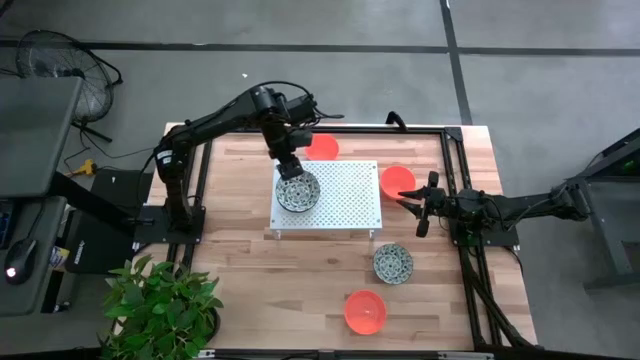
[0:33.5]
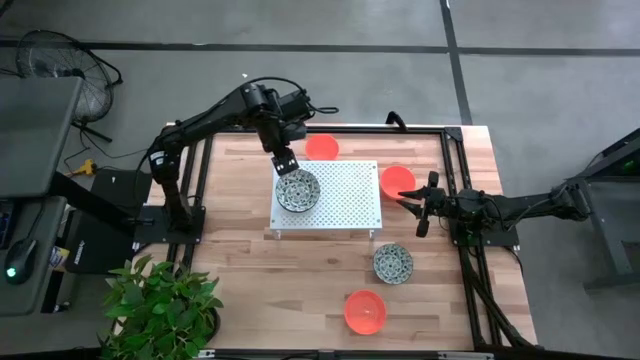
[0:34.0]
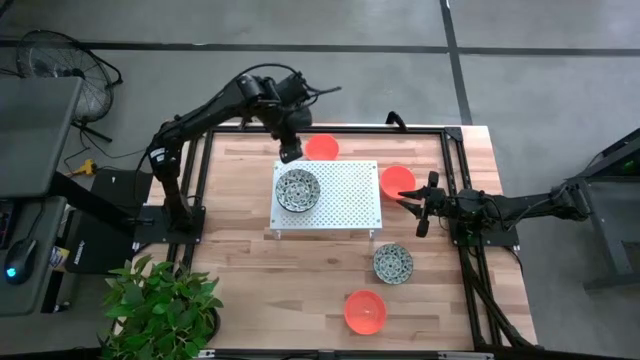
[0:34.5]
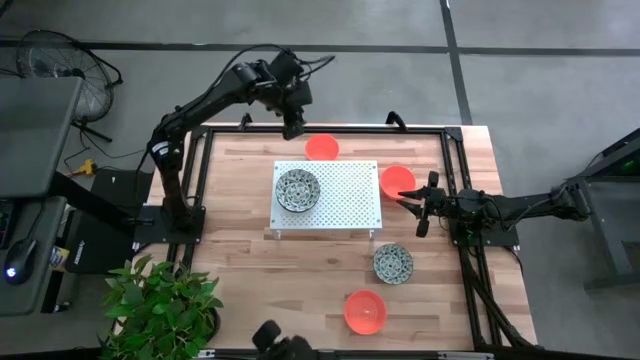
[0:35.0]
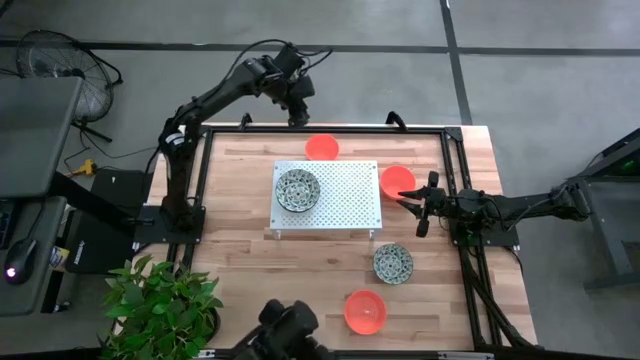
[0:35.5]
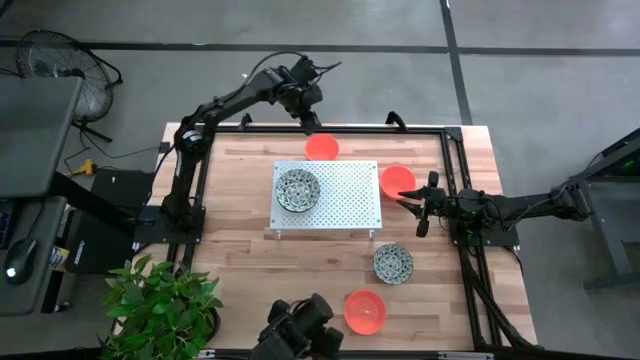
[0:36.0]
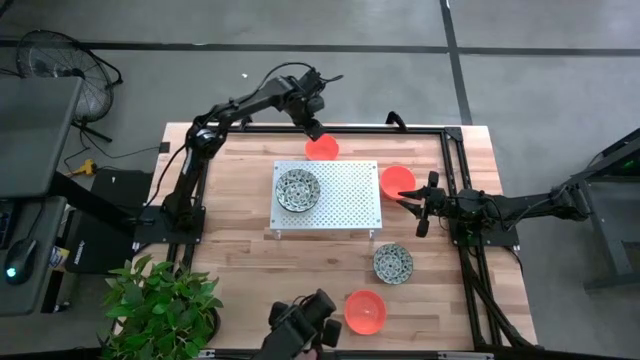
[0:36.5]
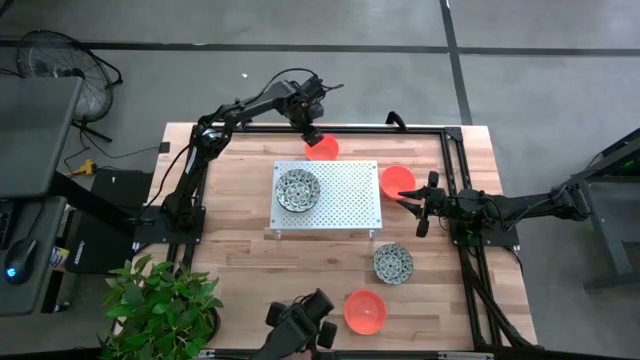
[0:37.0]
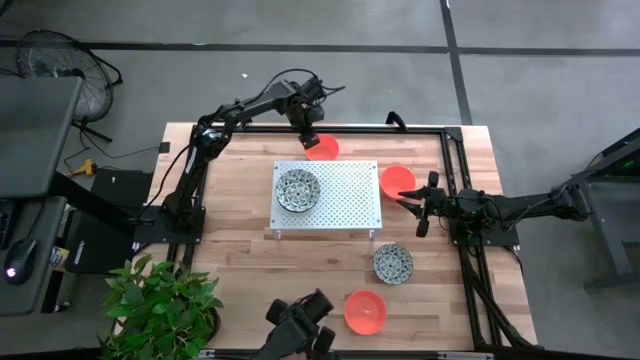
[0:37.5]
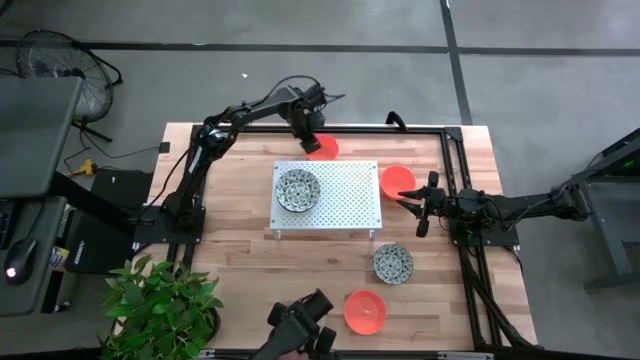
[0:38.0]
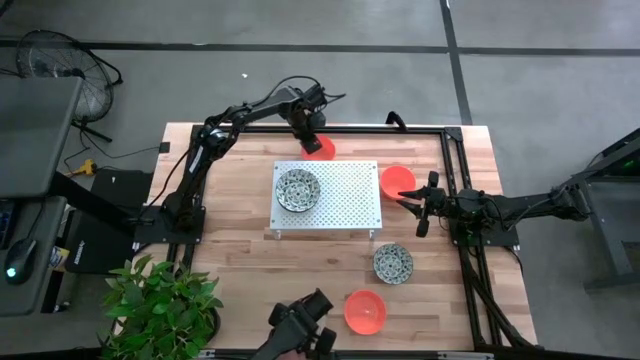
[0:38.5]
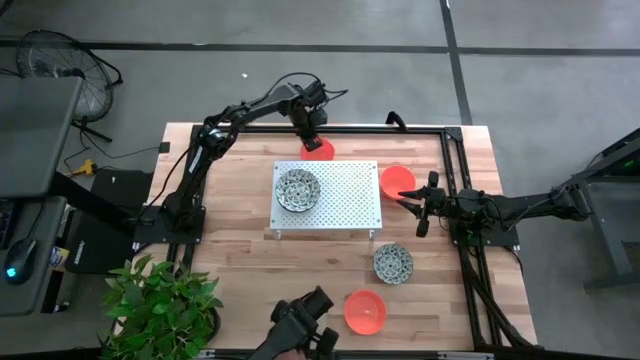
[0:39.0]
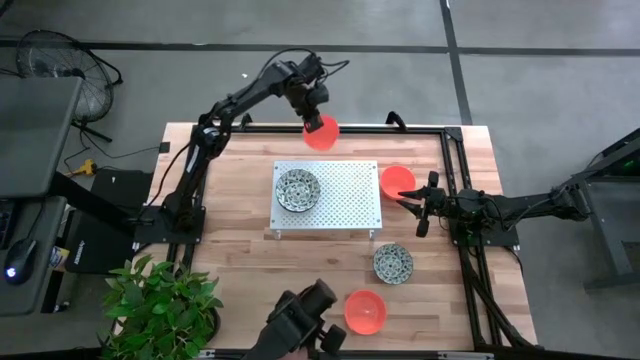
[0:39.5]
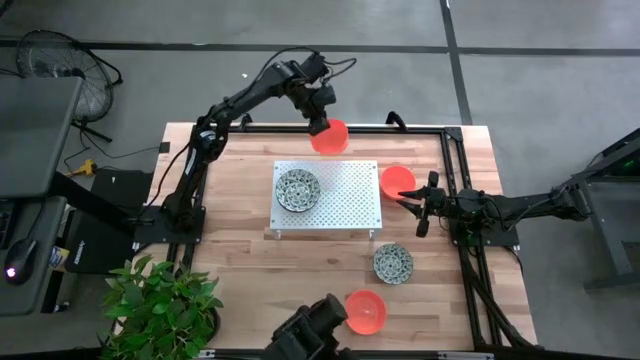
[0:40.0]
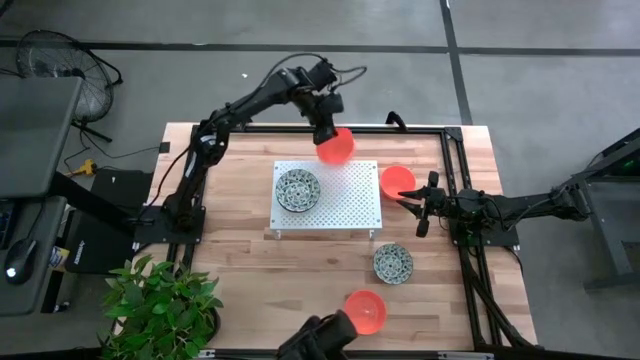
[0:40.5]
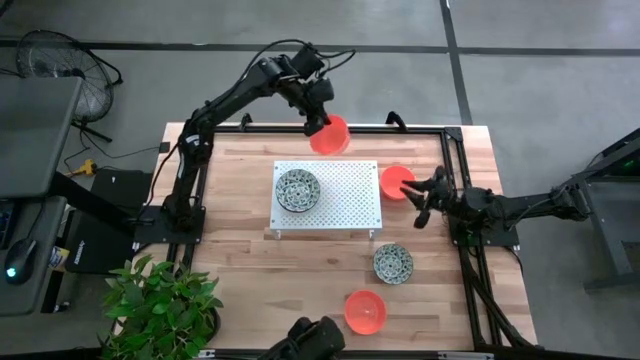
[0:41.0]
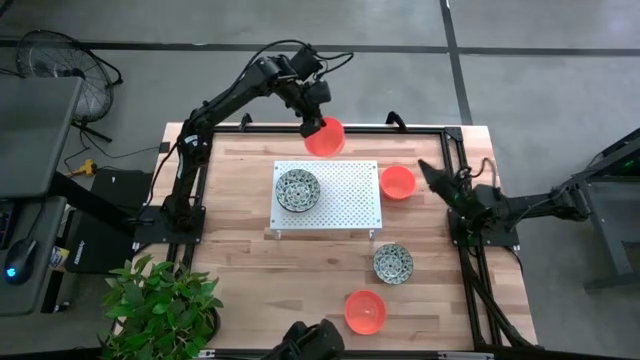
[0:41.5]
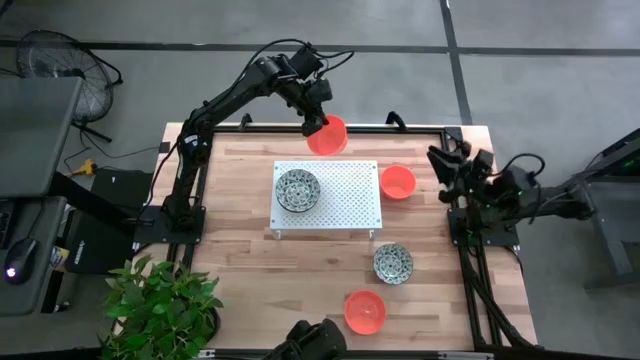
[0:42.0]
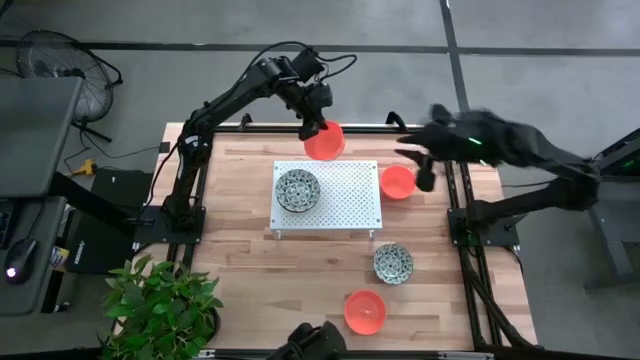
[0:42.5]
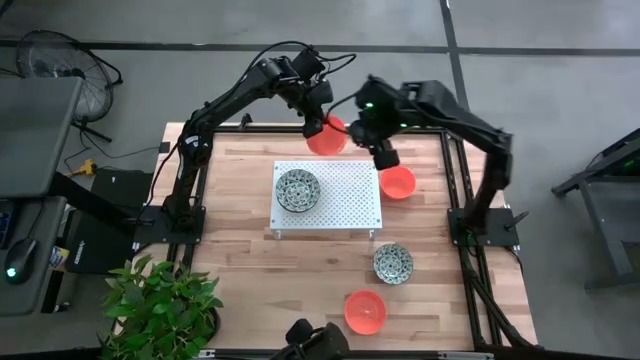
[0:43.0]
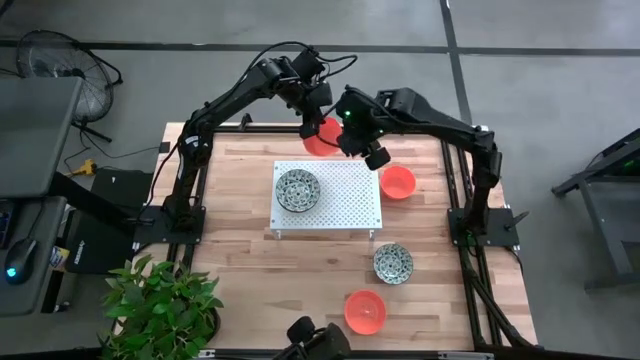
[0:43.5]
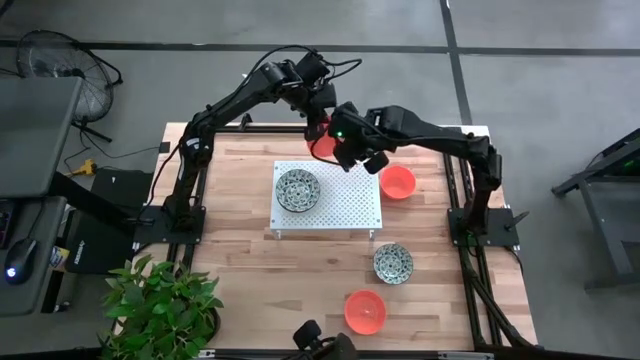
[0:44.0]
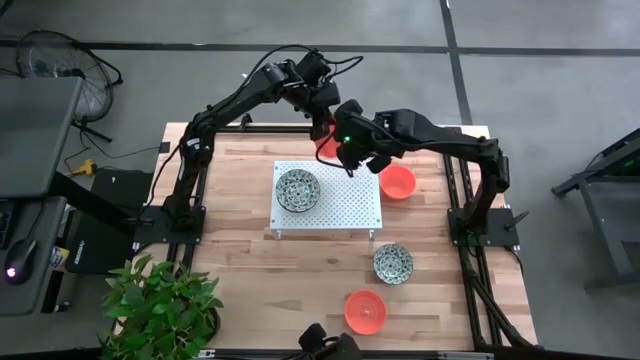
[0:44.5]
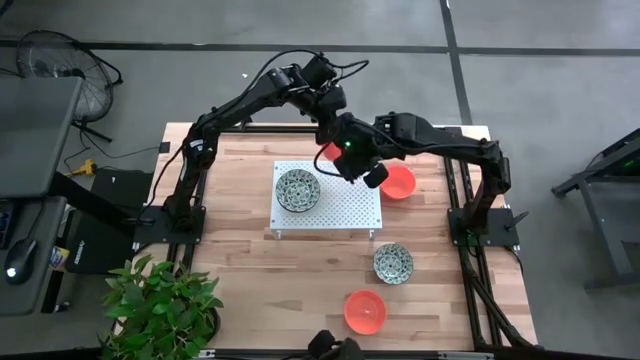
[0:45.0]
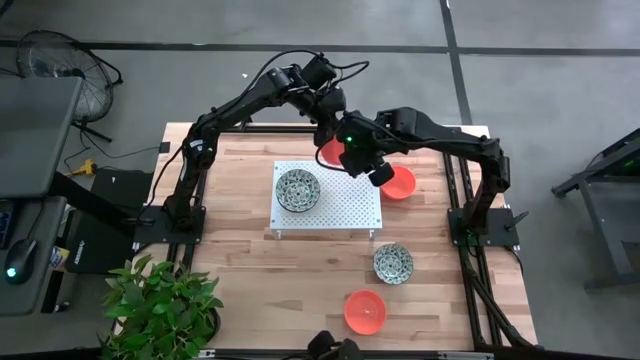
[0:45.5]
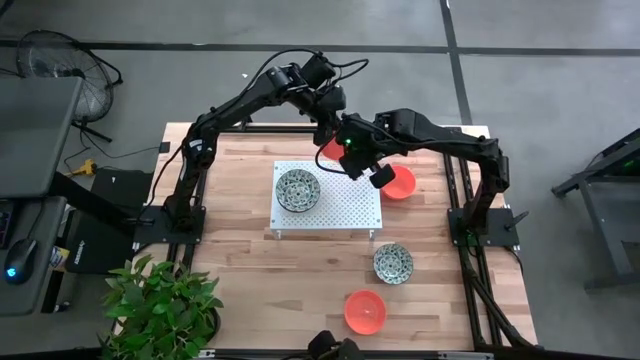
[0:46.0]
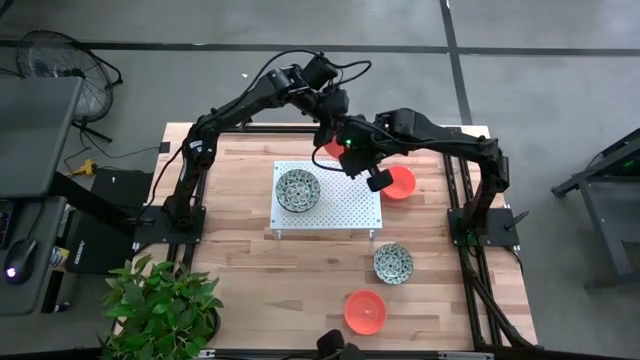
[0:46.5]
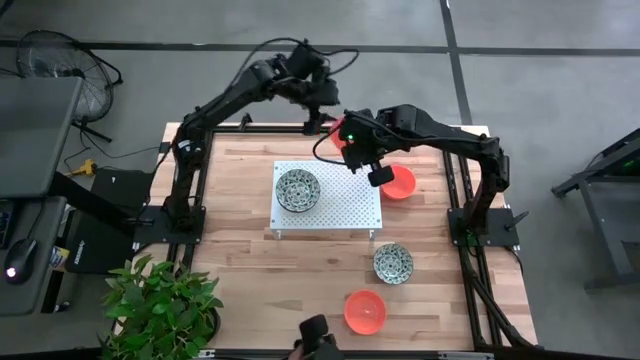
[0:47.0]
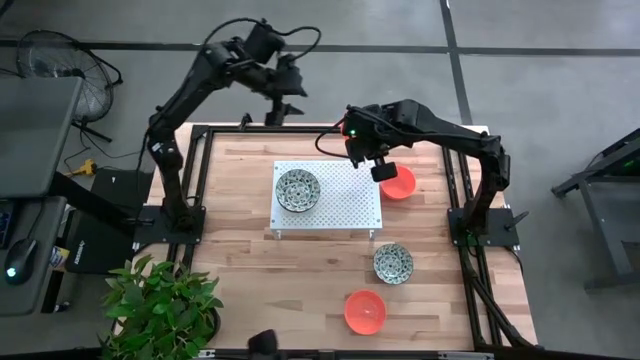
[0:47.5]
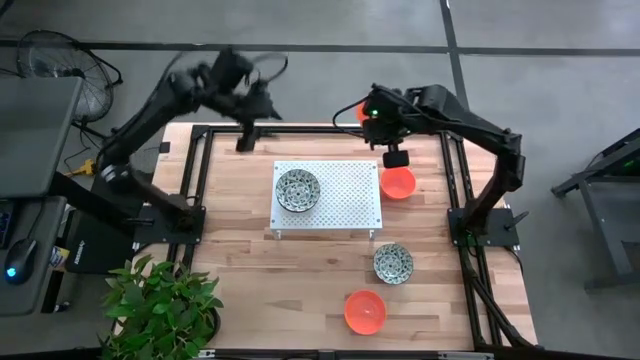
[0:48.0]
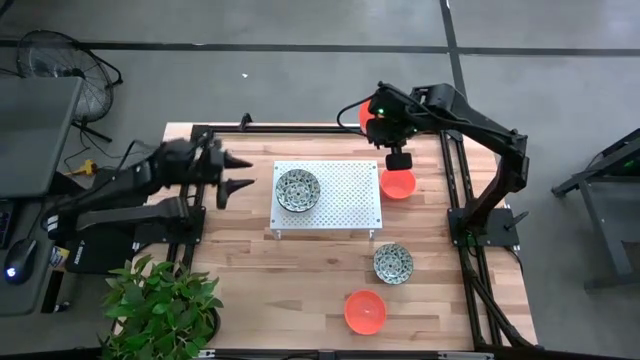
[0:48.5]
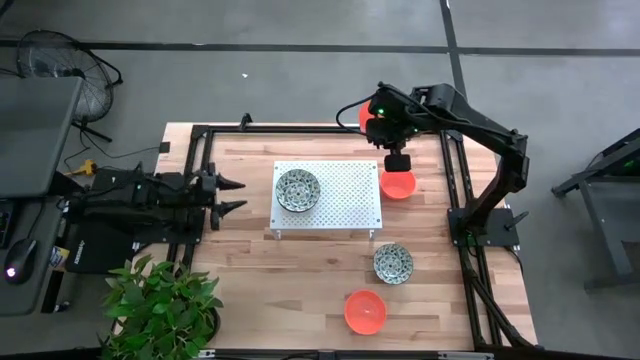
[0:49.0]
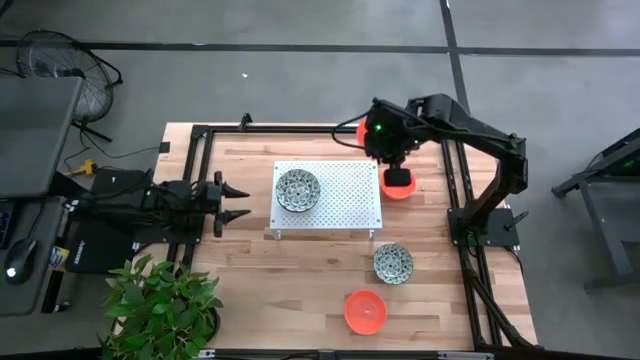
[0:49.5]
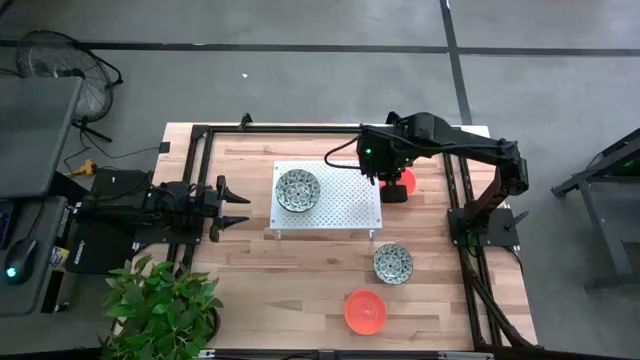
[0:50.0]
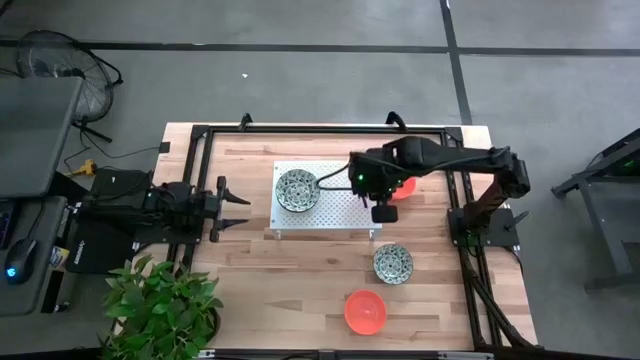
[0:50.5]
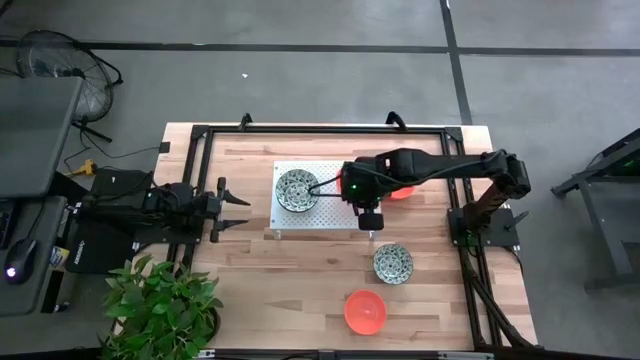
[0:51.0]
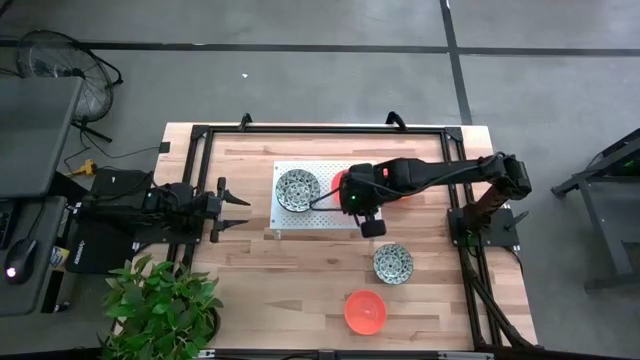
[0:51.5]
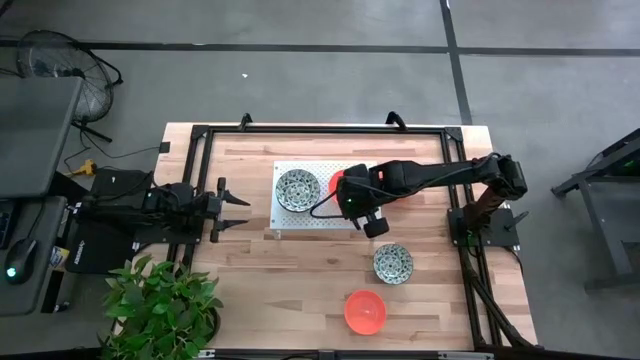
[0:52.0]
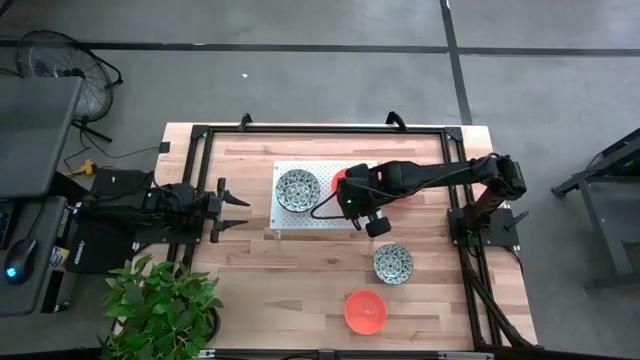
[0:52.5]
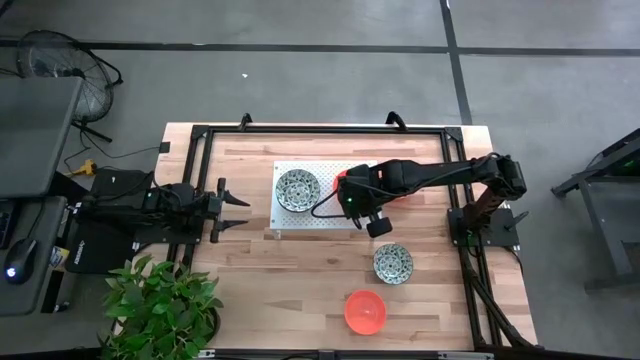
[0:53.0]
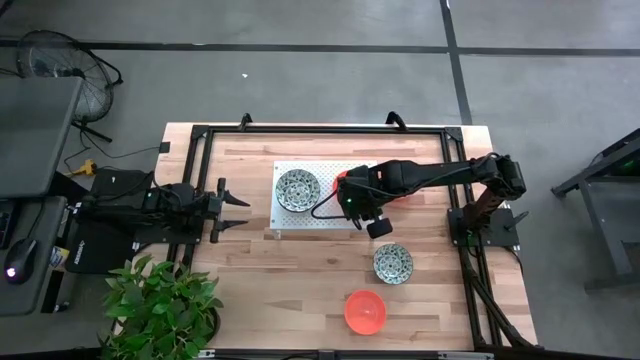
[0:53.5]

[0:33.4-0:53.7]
Task: Pick & Place Mini bowls
Put the top left orange bowl on the shelf

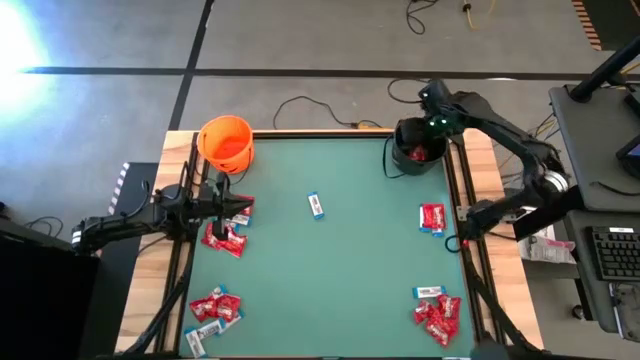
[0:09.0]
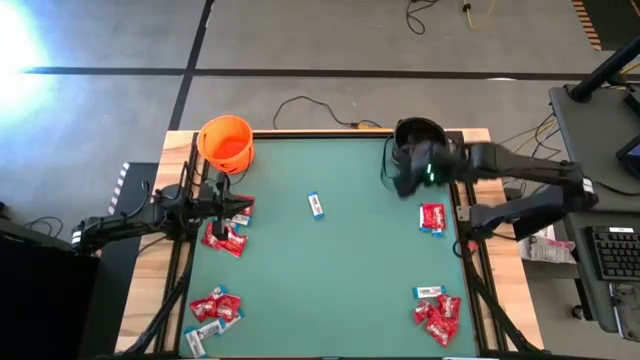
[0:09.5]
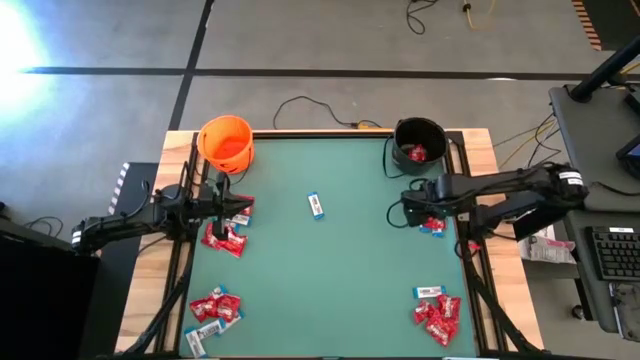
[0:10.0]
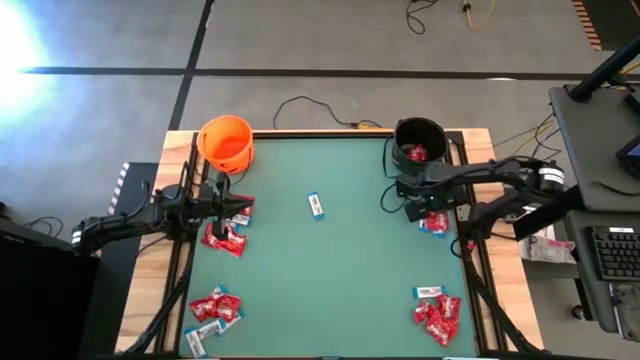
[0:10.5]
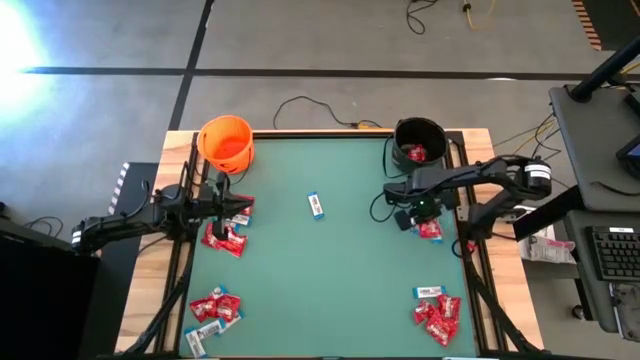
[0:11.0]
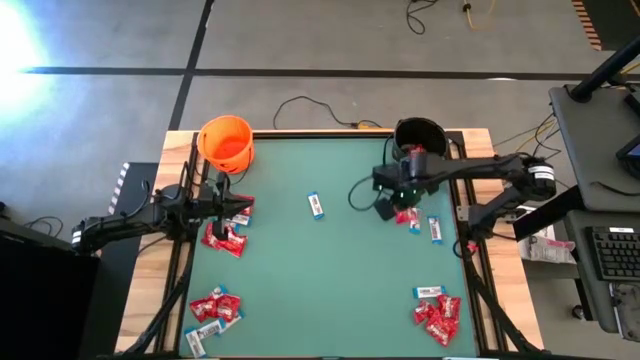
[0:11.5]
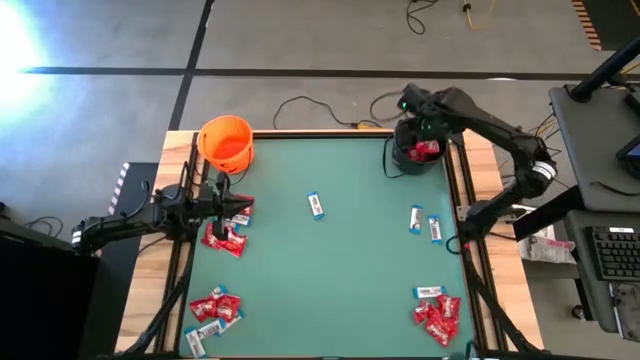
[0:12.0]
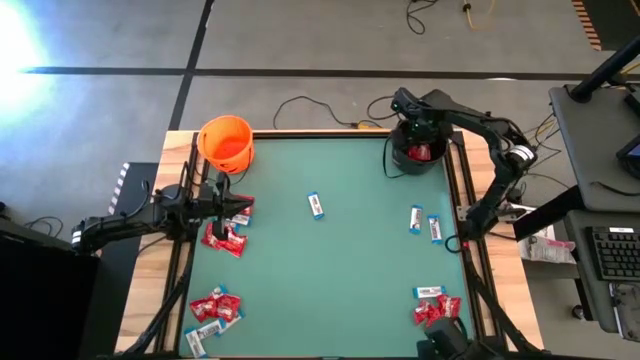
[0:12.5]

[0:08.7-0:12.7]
Task: Sort candy by brand, put in halloween buckets
Put the red candy into the black bucket
